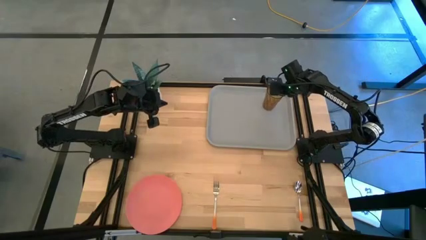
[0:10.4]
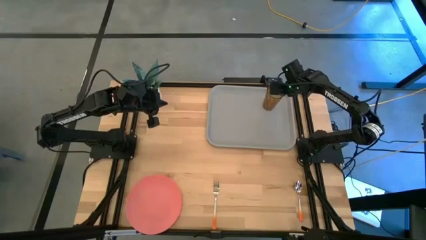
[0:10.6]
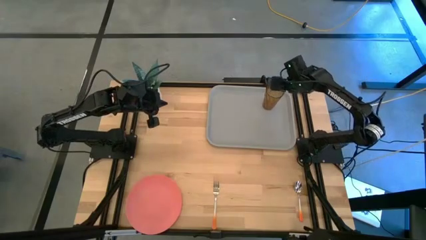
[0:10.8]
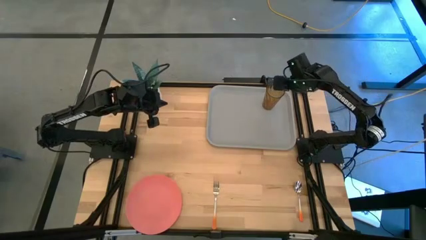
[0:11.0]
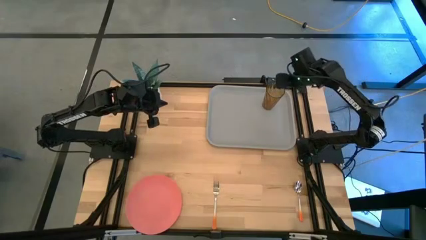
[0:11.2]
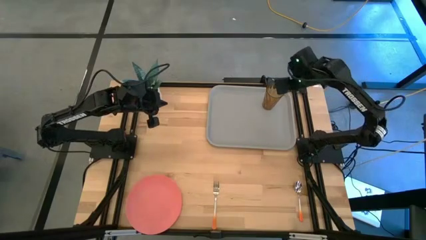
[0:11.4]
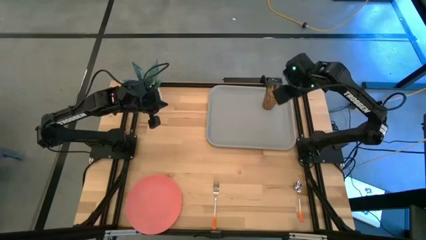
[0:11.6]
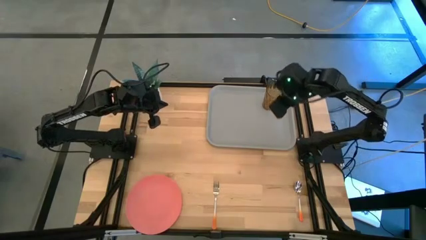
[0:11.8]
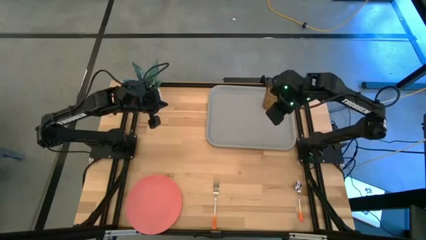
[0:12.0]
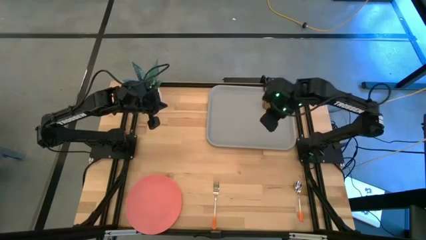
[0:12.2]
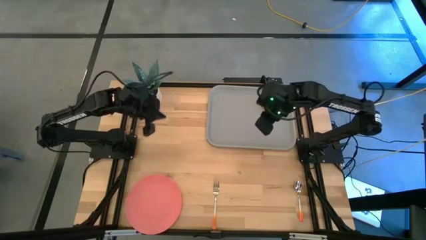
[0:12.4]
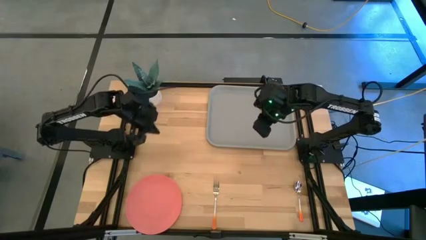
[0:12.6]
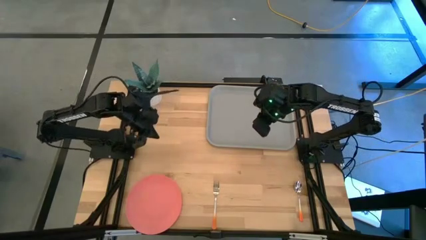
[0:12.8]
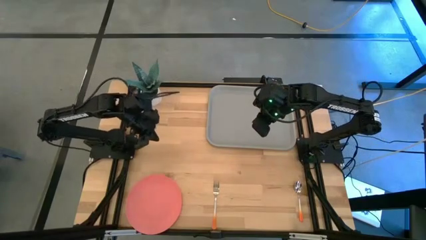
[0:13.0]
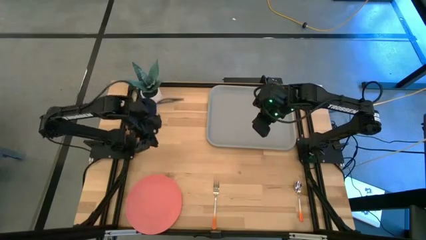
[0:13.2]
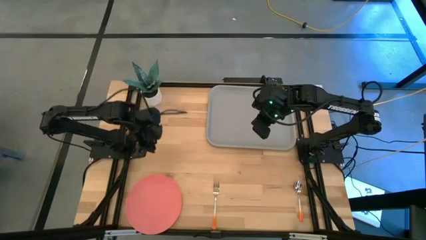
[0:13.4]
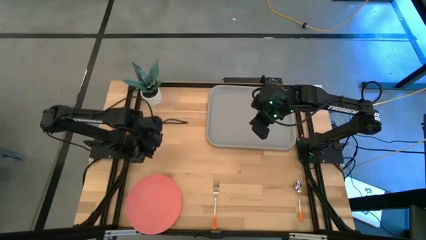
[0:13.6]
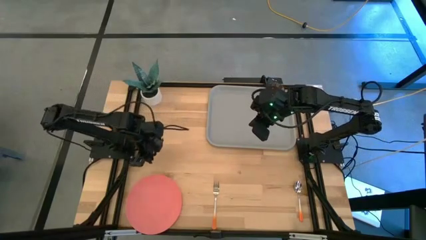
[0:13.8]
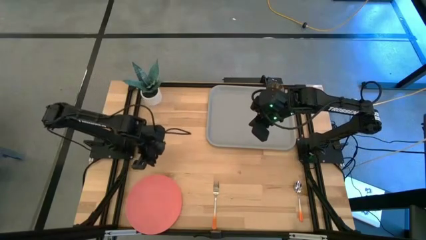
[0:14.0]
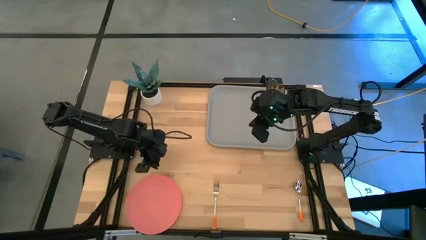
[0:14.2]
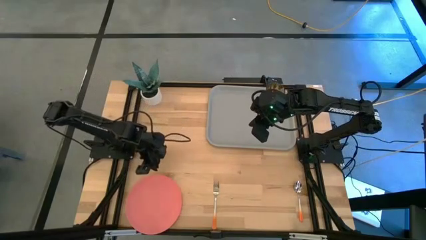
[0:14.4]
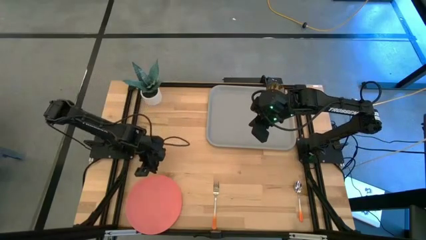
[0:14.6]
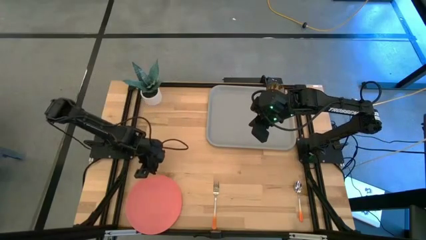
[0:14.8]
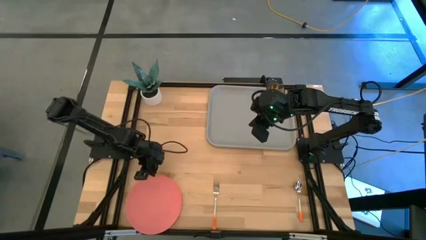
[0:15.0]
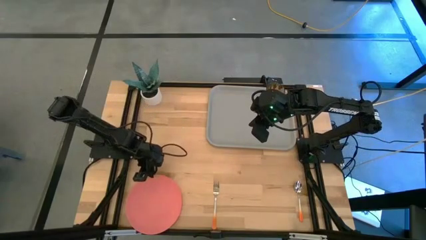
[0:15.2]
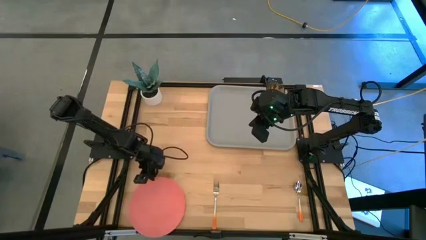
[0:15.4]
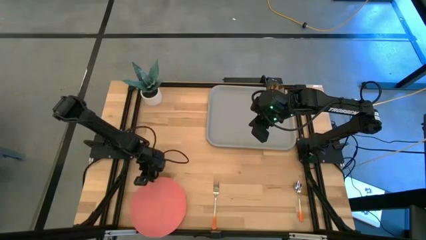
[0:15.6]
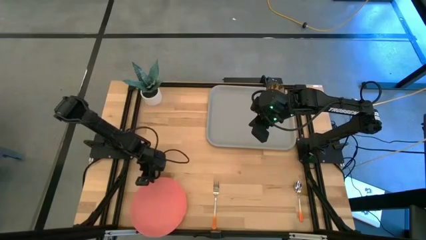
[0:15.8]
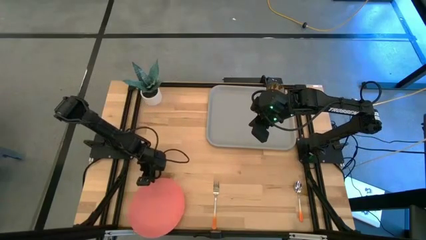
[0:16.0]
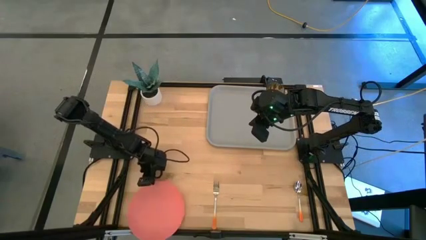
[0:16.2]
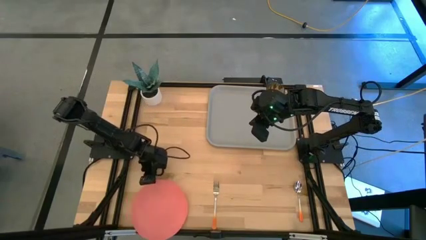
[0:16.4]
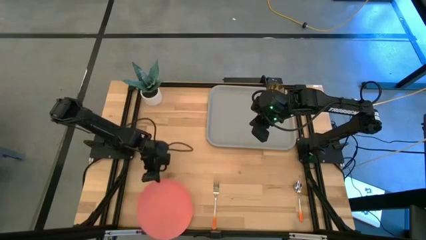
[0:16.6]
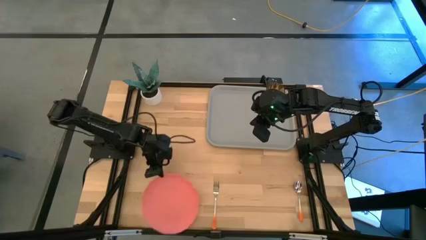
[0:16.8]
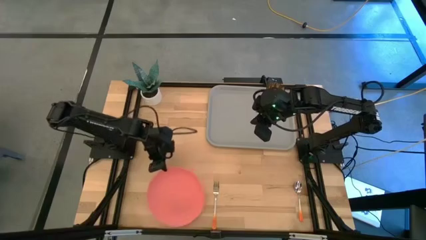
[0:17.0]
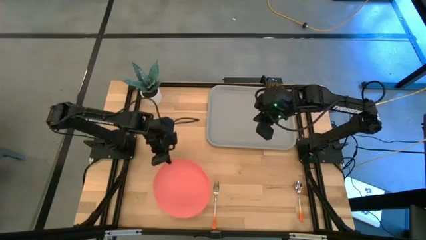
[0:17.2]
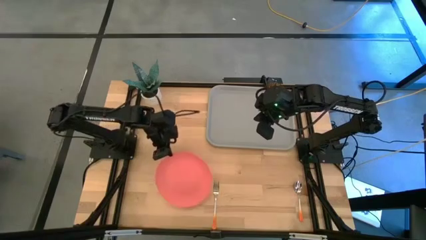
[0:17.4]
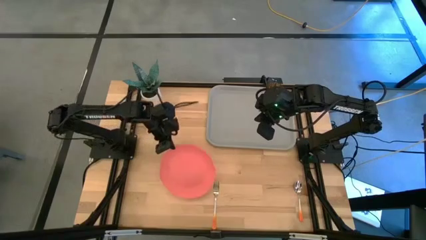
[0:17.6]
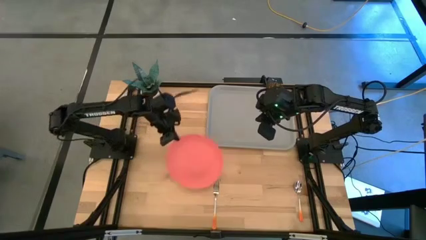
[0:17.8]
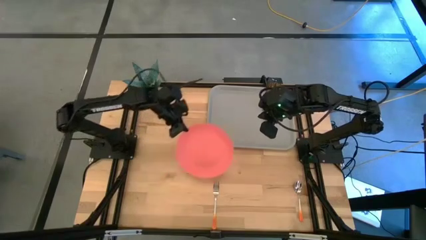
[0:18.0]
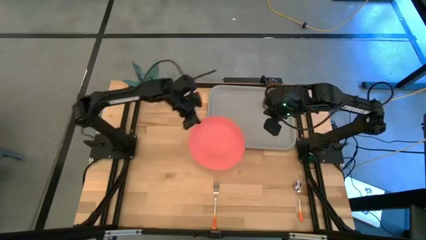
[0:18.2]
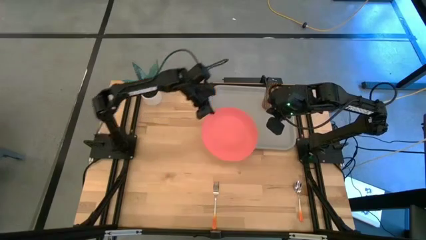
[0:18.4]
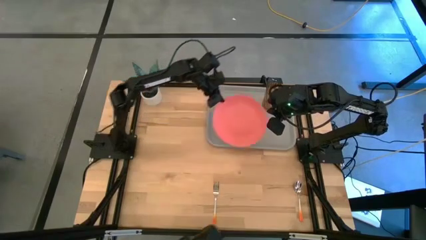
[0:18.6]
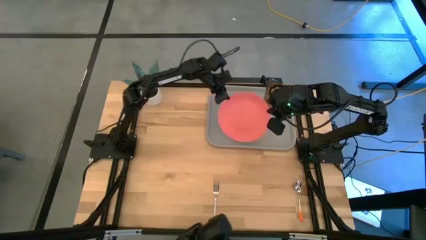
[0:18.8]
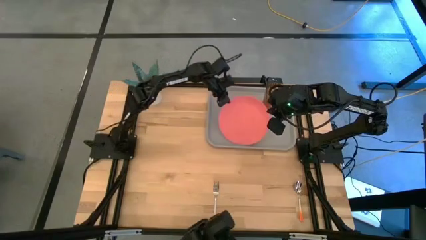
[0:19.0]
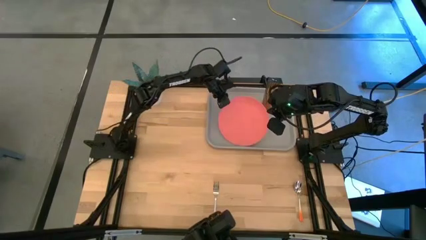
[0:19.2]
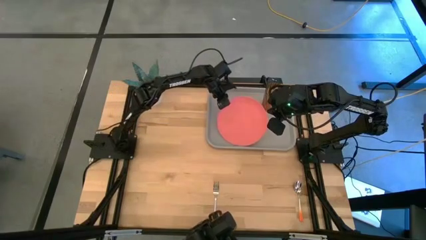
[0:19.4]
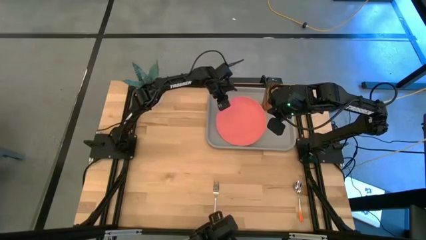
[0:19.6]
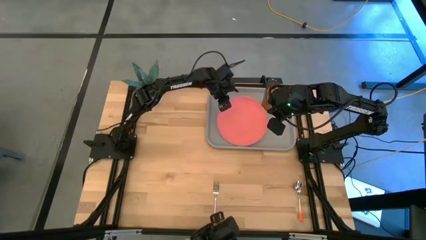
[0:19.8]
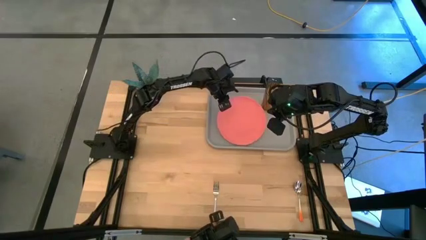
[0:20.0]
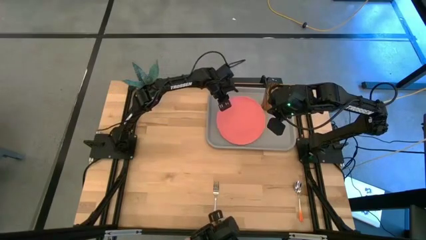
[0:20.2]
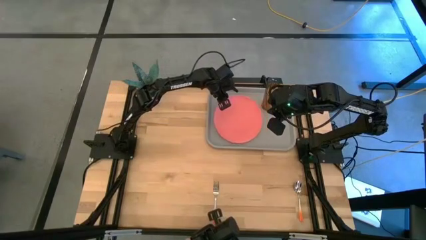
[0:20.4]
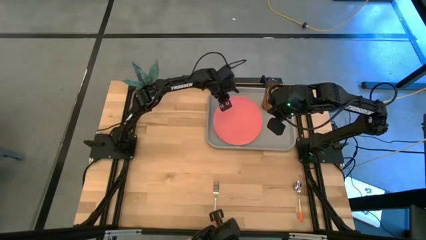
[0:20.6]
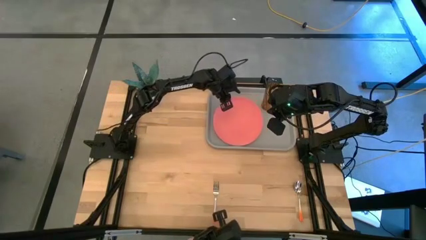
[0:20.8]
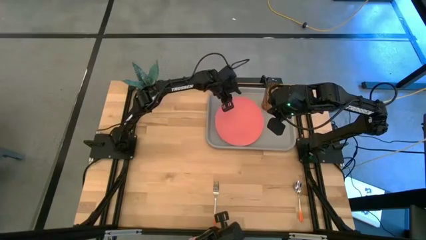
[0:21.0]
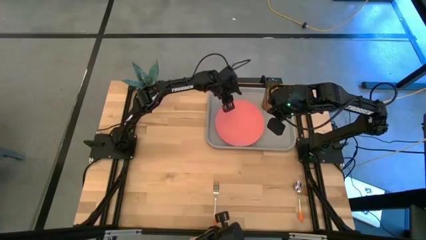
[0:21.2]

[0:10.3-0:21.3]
Task: Pick and place plate/cup/fork/spoon on tray
Put the pink plate on the gray serving tray

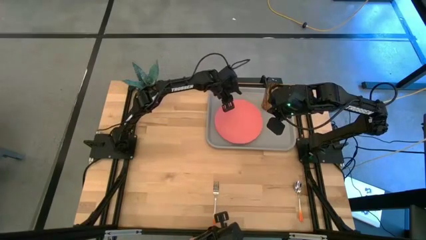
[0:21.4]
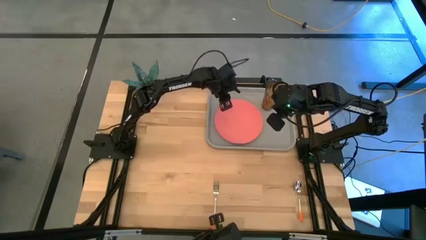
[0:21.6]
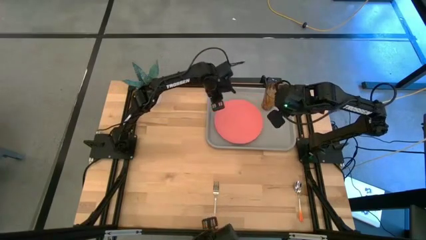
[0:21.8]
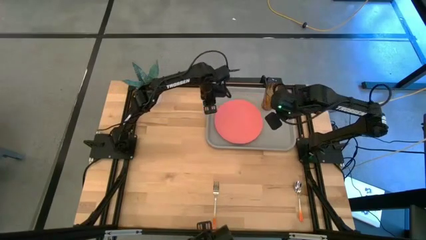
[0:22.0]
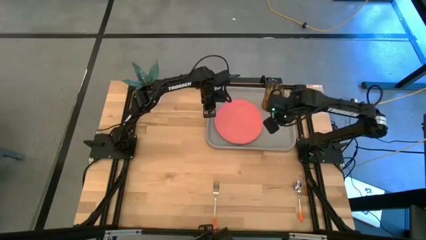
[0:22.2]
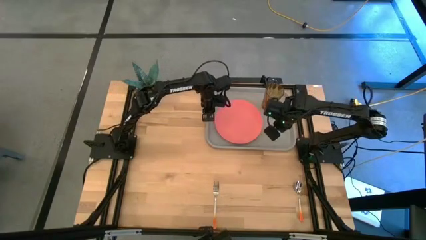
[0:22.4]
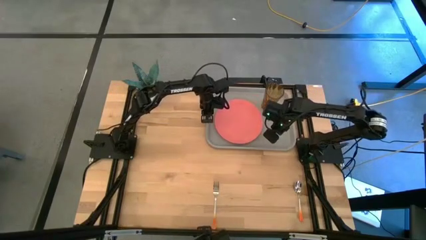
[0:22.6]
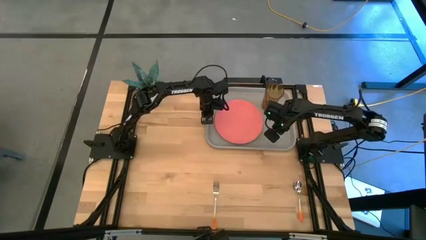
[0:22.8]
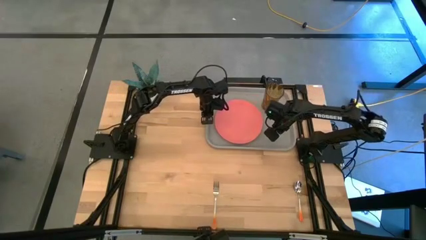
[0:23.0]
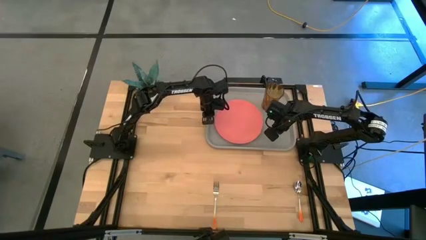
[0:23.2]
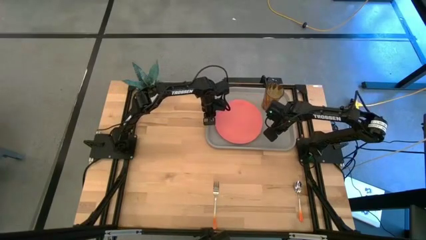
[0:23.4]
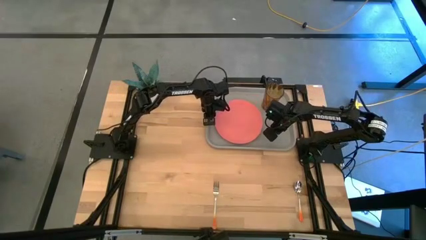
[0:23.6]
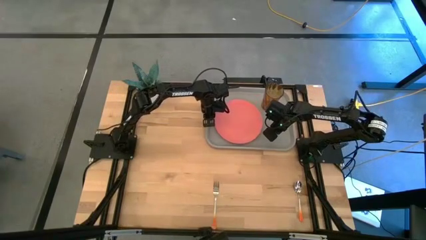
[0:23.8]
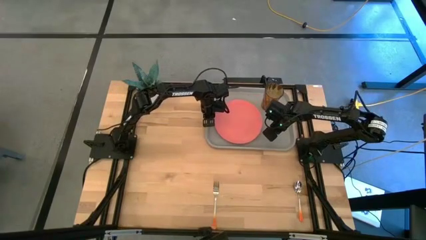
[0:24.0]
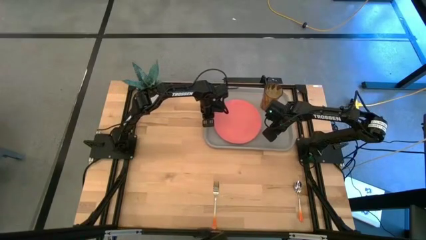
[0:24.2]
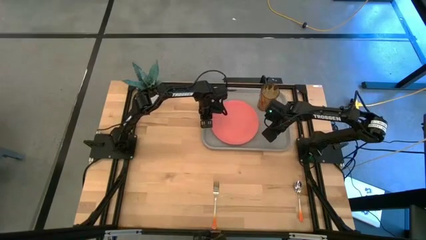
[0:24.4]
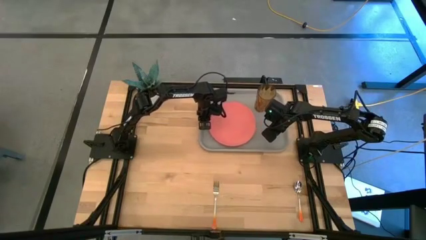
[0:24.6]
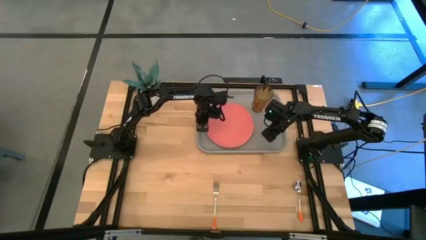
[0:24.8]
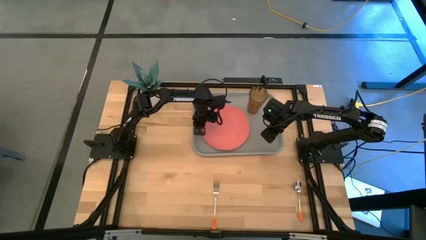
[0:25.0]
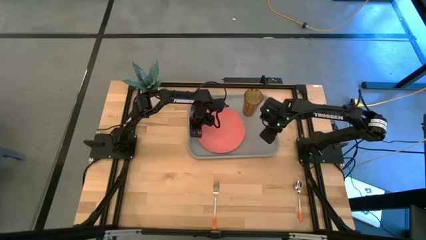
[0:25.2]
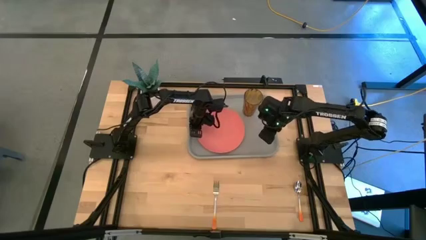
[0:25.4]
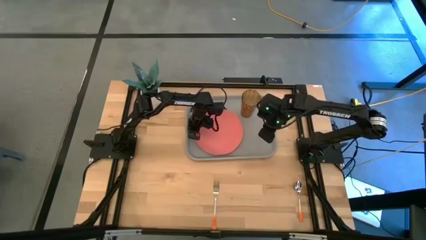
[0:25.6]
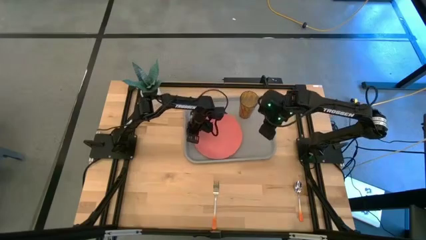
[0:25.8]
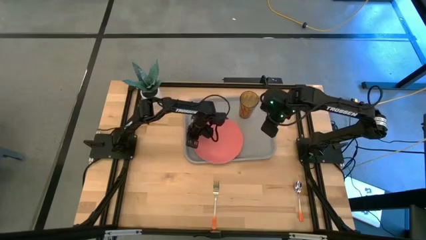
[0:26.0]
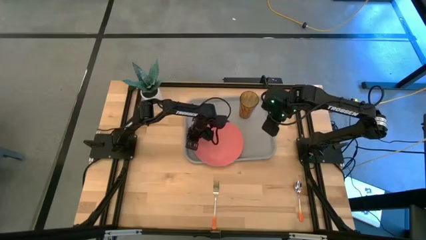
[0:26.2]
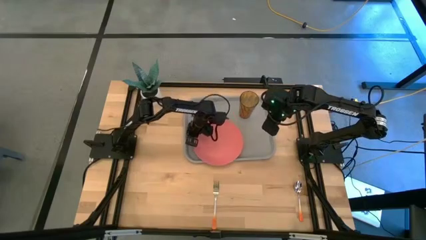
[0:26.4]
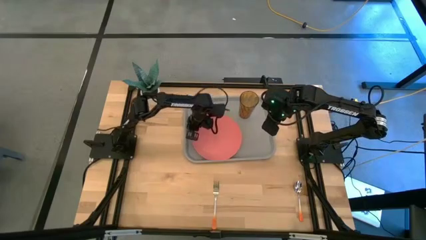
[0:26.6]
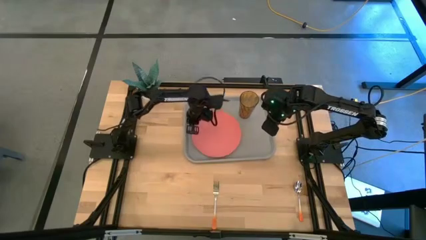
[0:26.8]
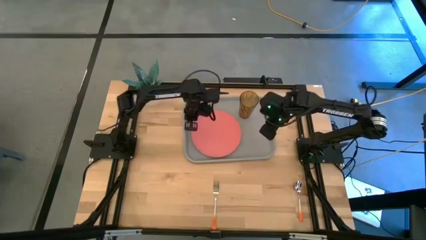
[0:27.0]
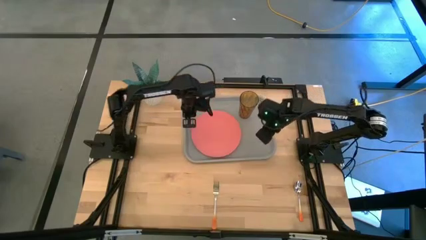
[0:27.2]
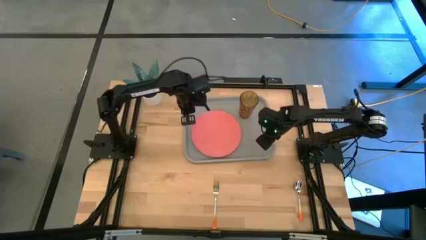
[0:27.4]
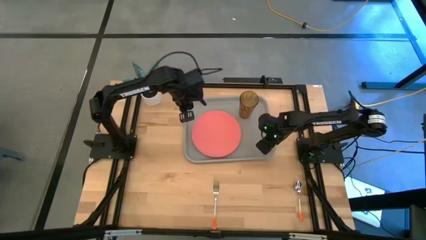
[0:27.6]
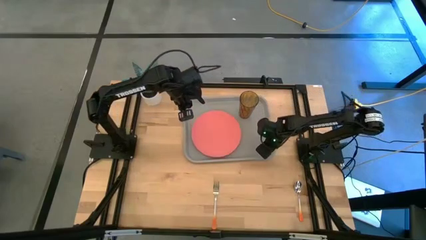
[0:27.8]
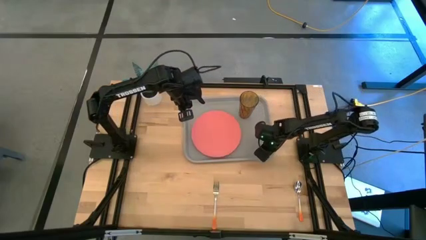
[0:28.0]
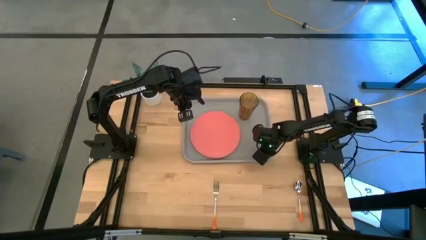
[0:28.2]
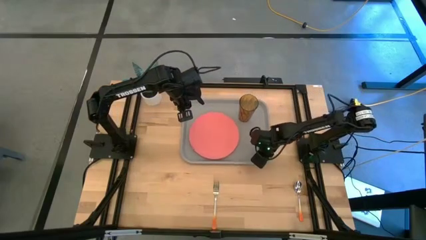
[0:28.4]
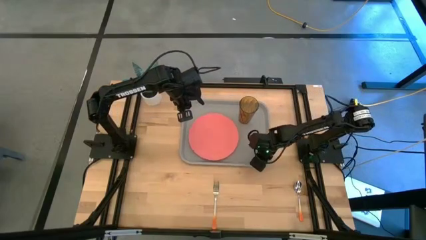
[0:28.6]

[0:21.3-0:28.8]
Move the gray serving tray to the center of the table
